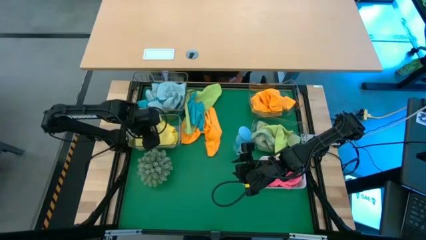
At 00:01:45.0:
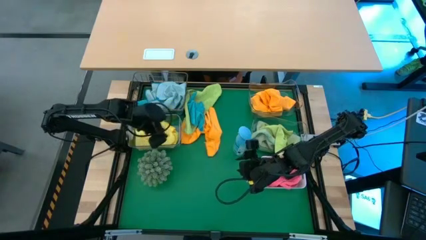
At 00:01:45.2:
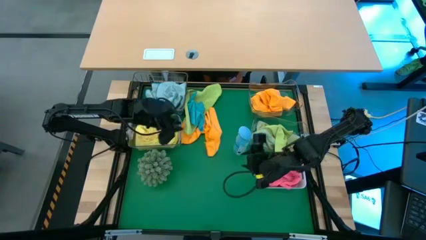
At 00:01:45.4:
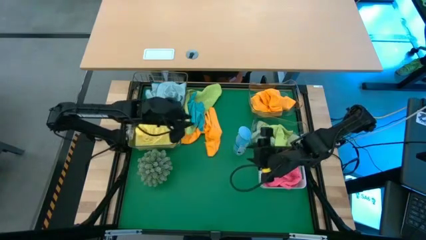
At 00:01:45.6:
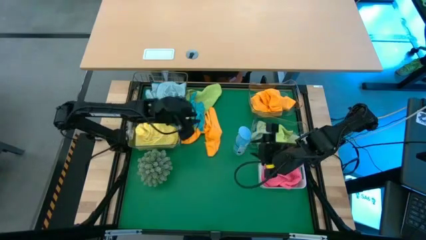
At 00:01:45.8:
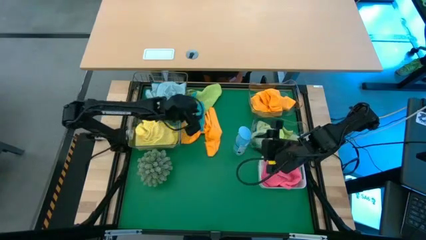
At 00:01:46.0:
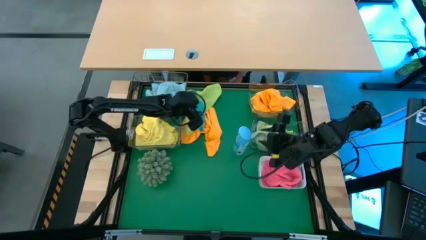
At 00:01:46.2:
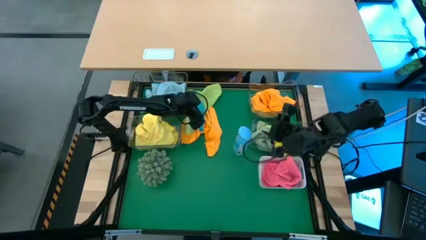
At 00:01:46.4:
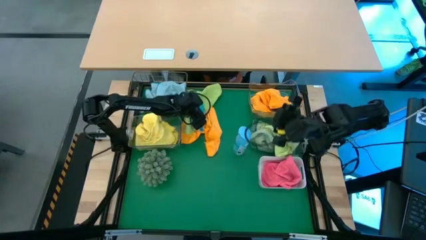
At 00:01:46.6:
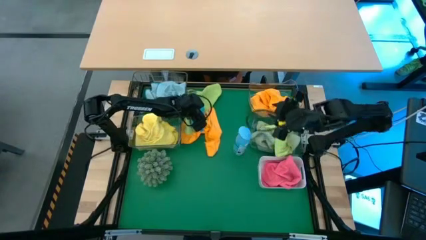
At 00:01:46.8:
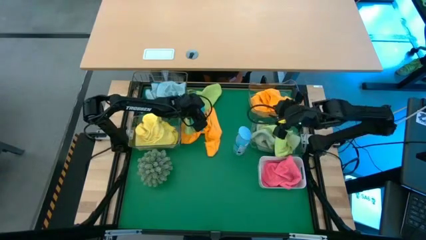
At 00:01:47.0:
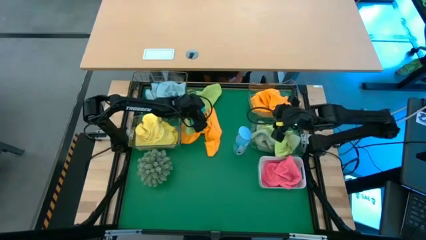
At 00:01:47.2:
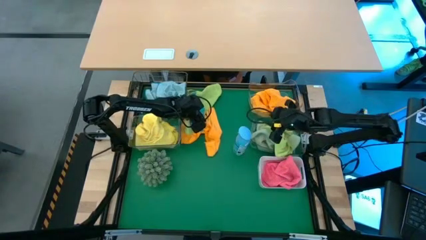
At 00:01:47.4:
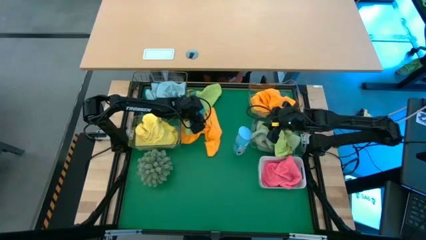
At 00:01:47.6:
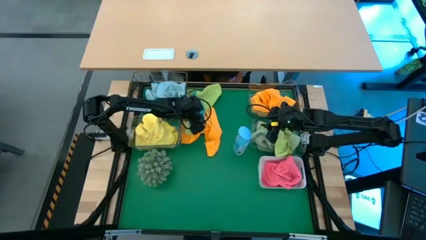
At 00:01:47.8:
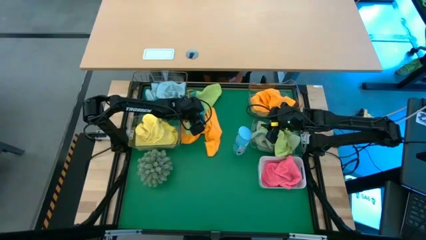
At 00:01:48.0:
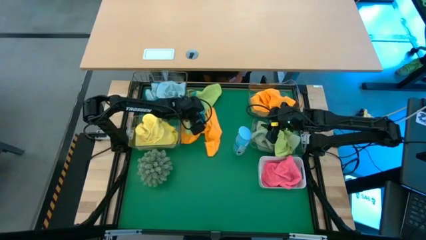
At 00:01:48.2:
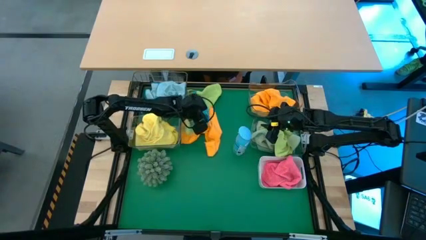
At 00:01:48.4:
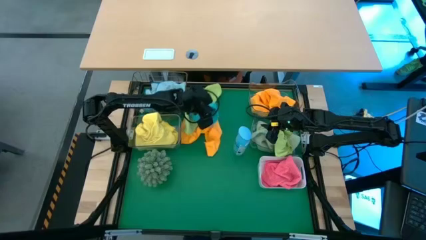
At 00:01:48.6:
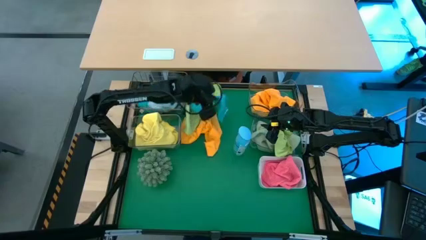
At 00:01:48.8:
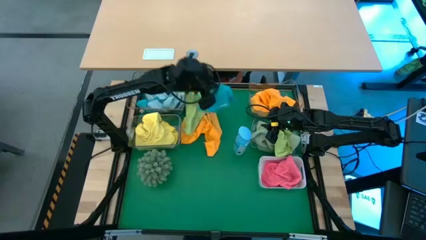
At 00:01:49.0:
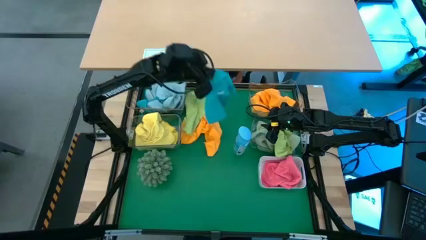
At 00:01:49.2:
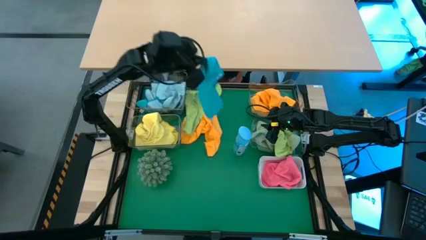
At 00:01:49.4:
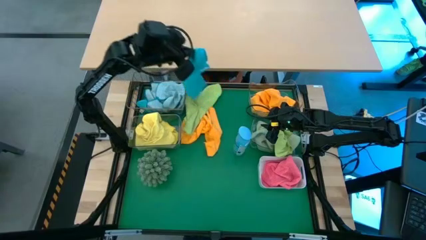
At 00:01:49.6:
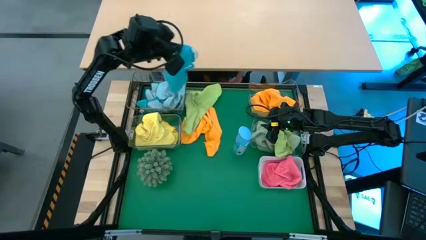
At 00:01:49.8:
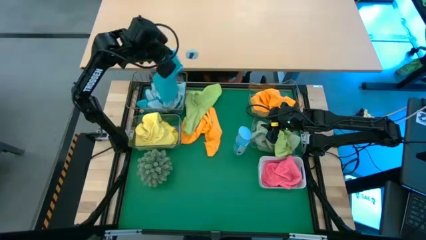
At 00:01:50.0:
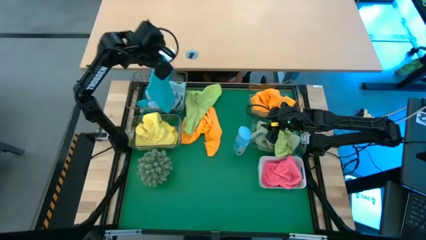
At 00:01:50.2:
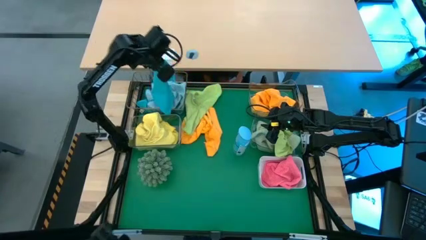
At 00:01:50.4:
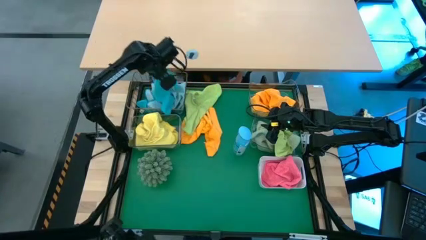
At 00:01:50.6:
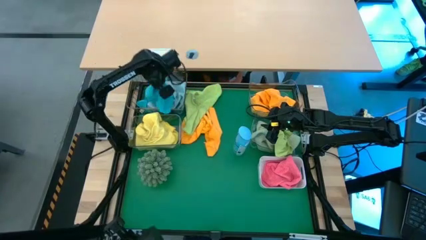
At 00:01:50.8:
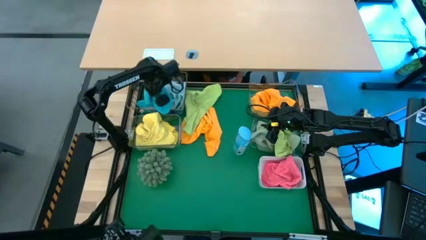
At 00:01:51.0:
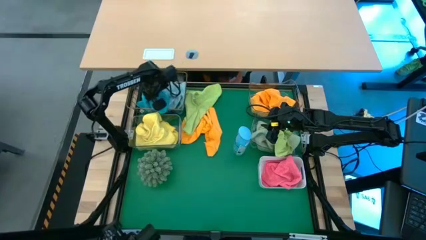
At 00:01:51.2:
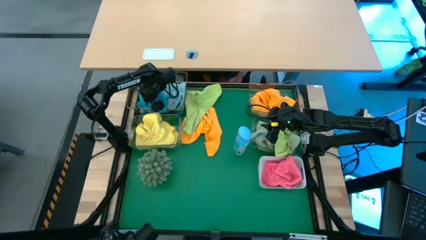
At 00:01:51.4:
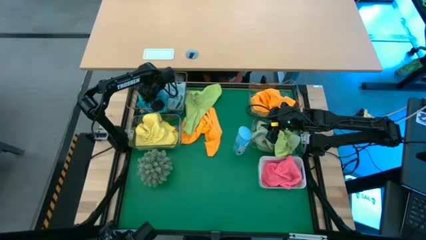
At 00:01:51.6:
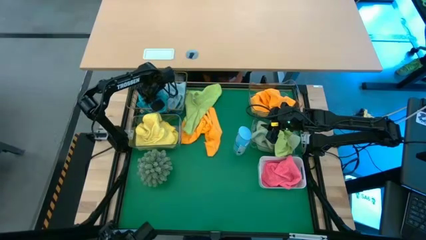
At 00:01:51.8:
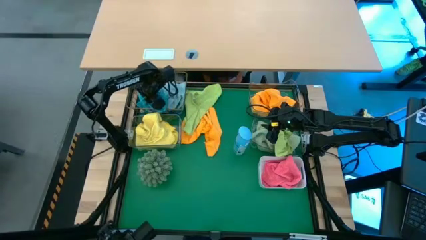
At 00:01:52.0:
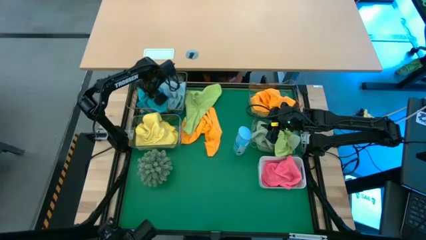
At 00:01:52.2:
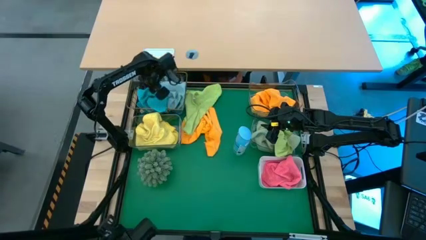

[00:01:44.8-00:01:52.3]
Task: Sort microfiber towel by color & place in baskets
Put the blue microfiber towel into the gold wire basket

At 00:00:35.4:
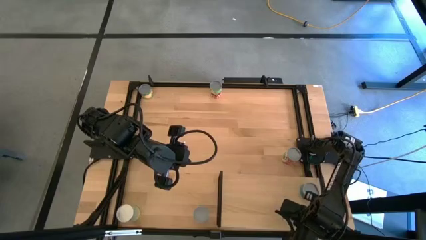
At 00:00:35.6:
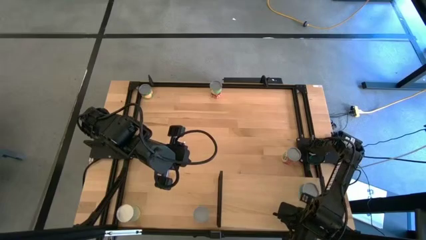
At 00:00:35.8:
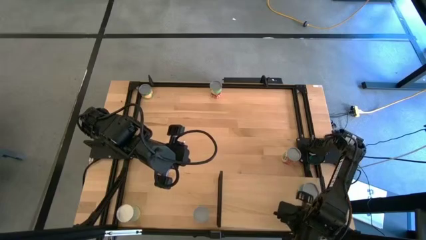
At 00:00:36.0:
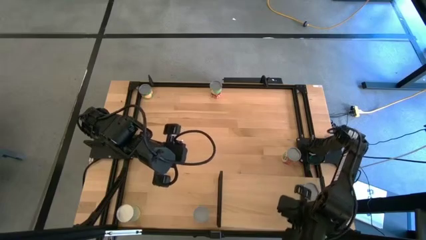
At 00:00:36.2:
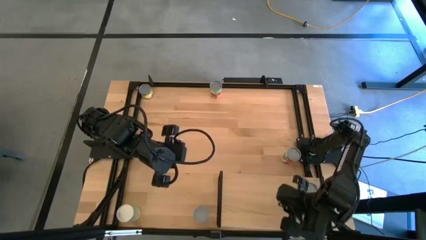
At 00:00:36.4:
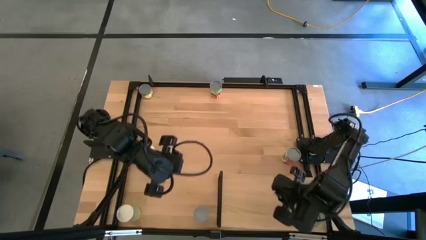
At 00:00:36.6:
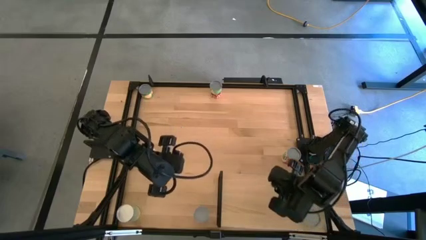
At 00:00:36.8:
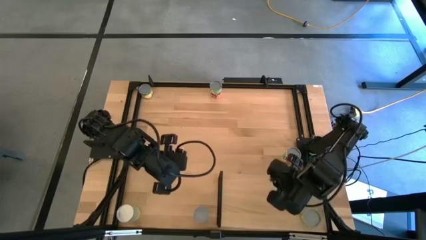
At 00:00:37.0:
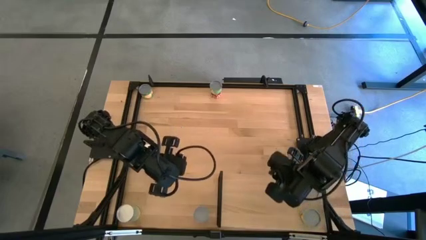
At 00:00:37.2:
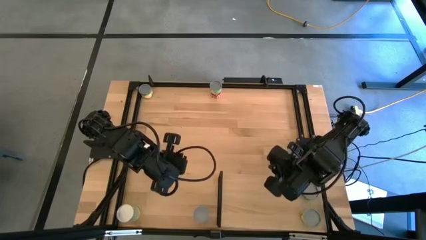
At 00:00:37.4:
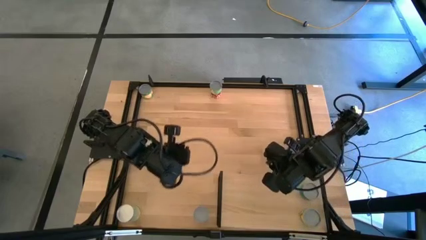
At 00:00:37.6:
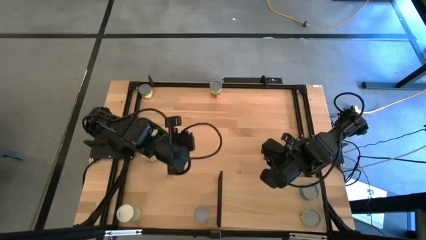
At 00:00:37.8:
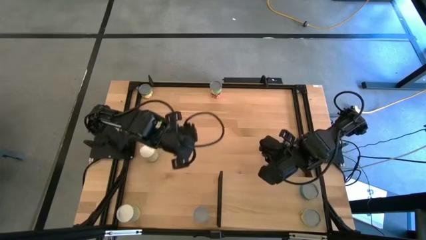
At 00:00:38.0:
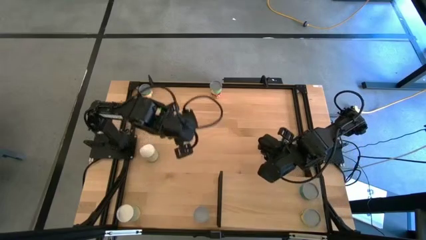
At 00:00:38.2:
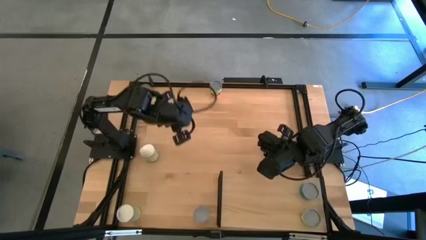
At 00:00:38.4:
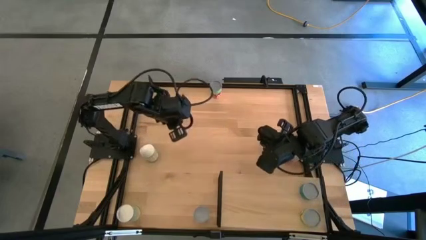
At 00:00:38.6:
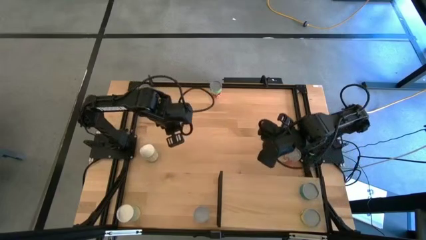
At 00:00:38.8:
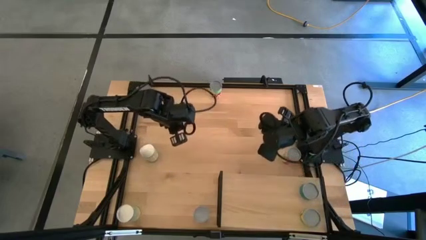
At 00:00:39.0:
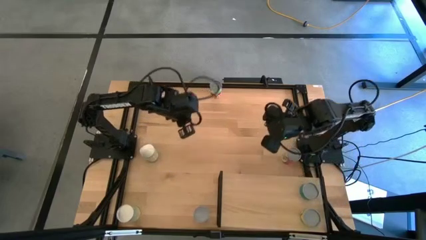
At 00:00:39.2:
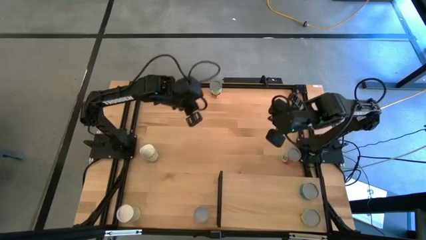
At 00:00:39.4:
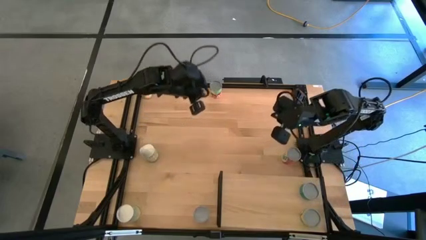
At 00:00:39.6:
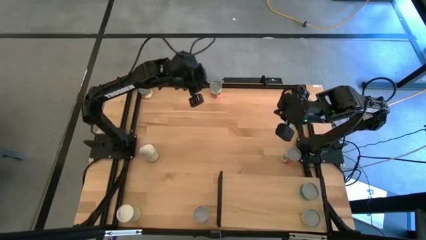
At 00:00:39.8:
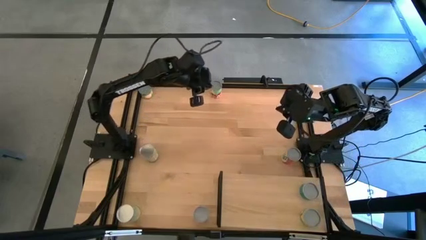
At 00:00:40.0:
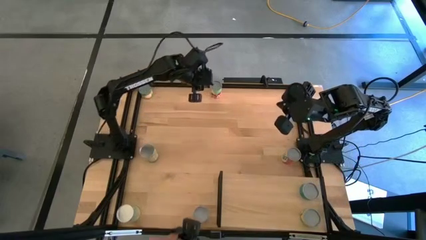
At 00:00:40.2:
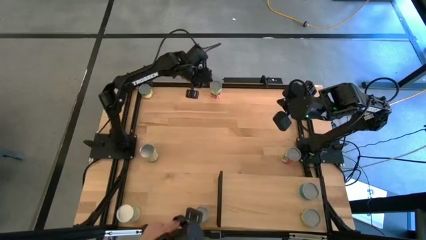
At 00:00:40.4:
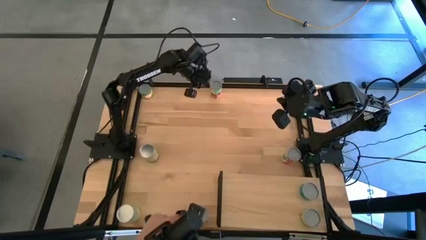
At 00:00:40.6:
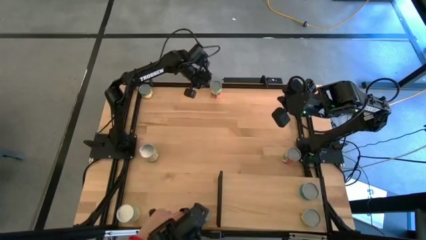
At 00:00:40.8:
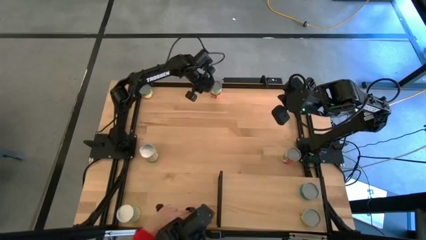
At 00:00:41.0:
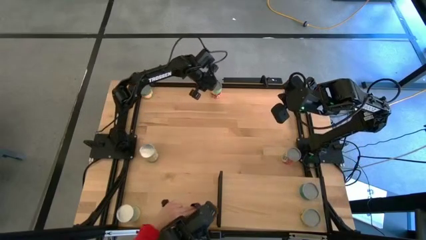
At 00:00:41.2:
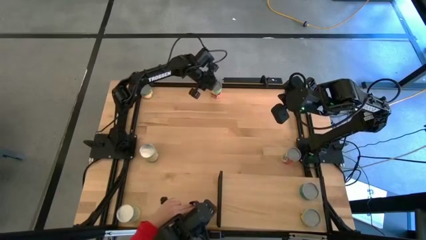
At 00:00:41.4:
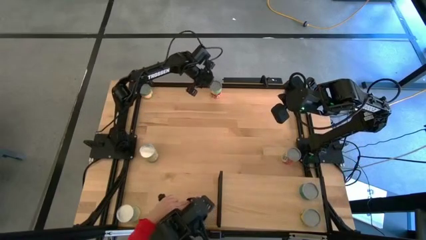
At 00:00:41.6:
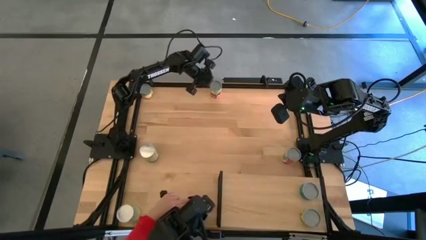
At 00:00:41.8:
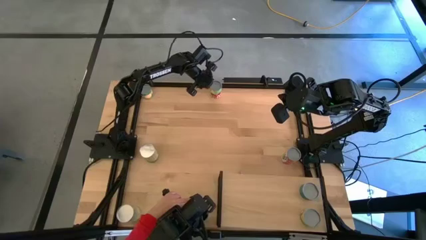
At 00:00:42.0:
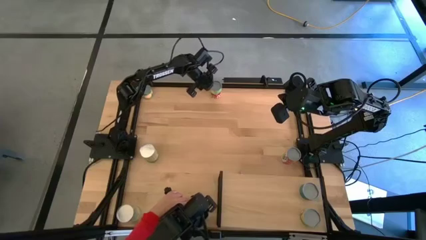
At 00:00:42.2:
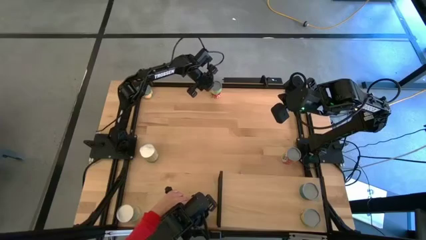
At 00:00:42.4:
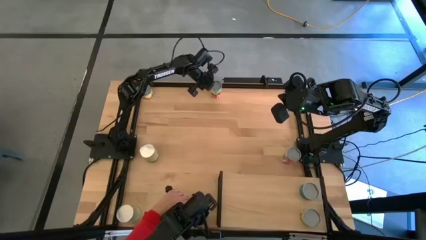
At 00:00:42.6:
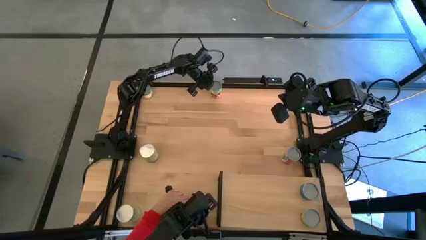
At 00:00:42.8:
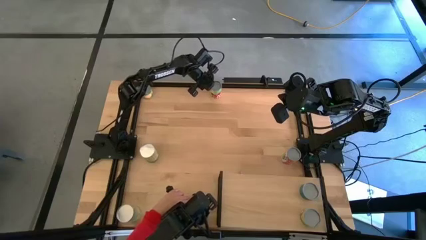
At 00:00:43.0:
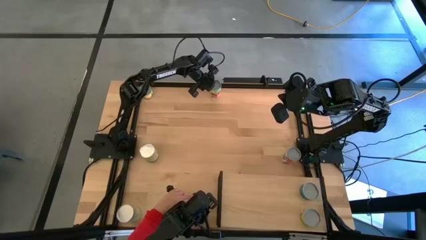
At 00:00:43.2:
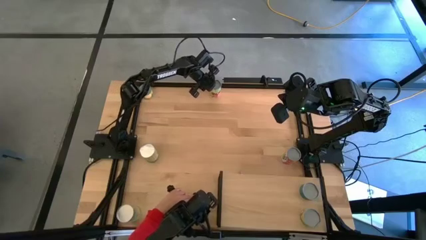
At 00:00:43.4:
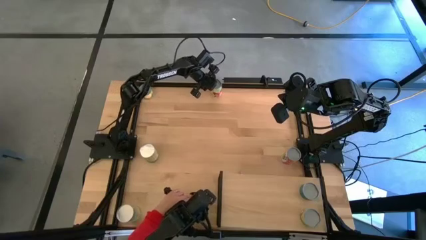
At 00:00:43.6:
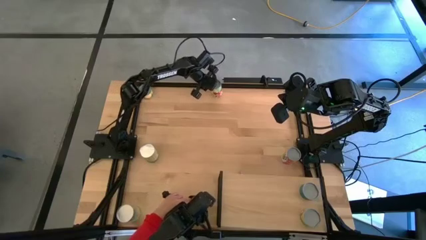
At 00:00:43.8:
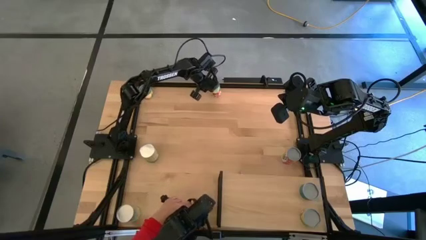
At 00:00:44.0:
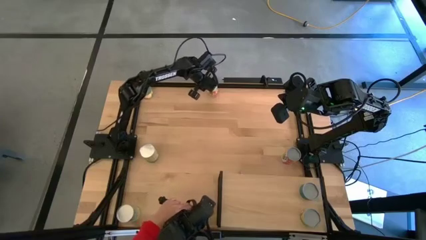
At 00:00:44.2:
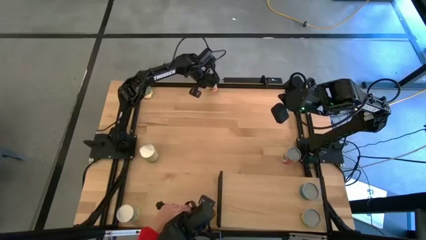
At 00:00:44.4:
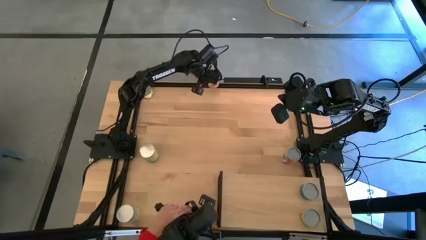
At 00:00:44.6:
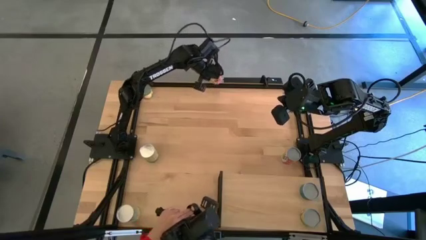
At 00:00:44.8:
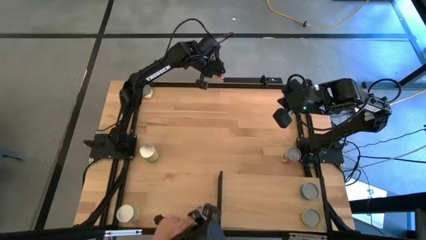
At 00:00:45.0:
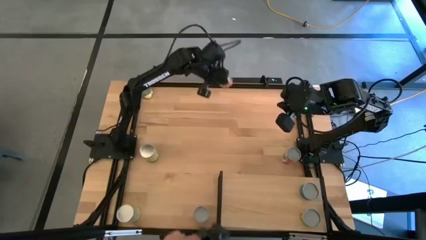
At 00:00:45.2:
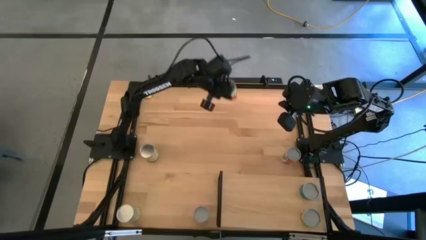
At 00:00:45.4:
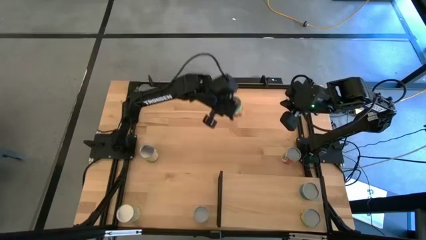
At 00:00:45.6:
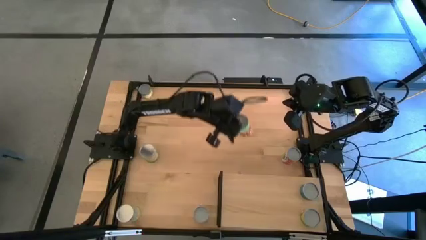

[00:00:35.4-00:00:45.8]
Task: Pick and place cans onto a shelf
Put the canned spaghetti sauce on the shelf
